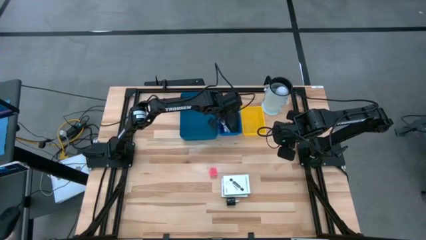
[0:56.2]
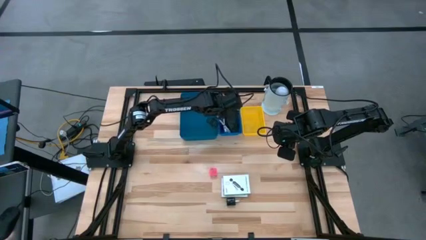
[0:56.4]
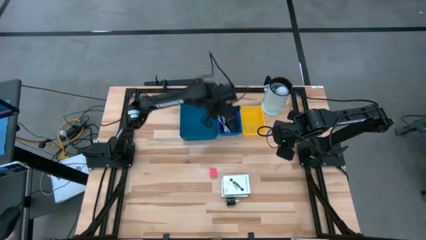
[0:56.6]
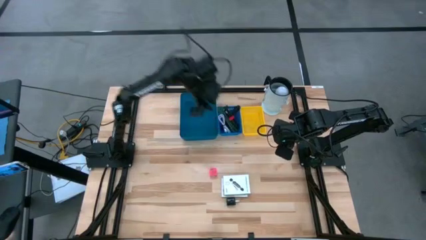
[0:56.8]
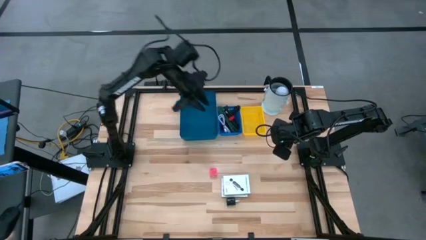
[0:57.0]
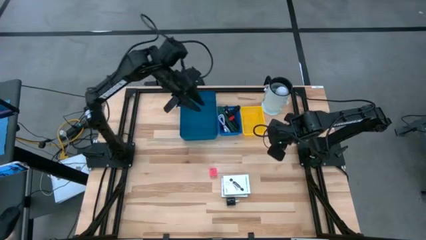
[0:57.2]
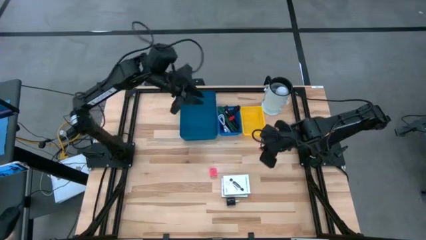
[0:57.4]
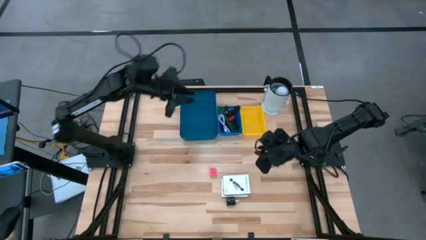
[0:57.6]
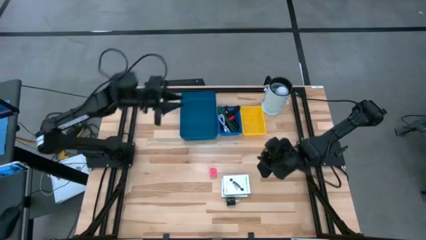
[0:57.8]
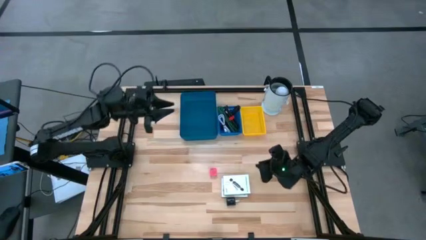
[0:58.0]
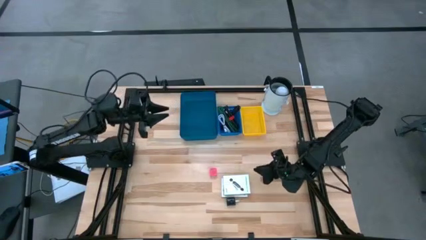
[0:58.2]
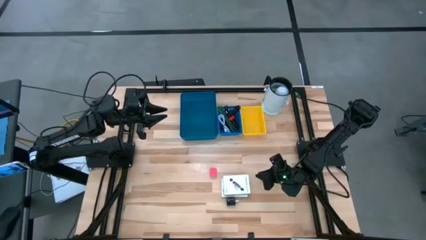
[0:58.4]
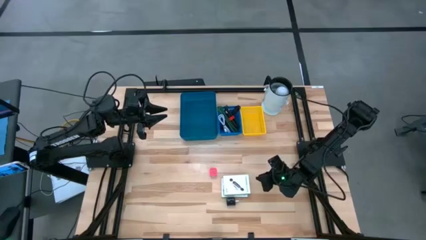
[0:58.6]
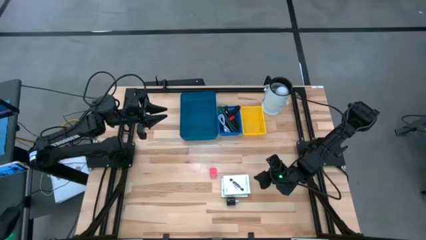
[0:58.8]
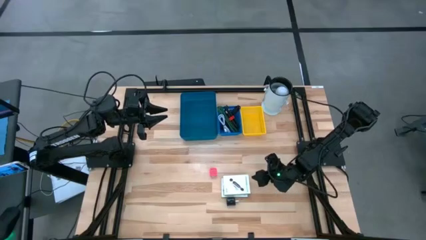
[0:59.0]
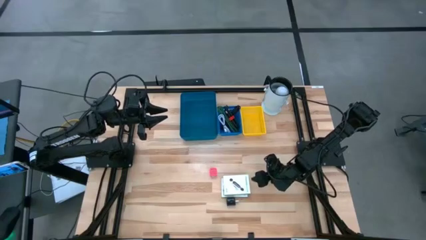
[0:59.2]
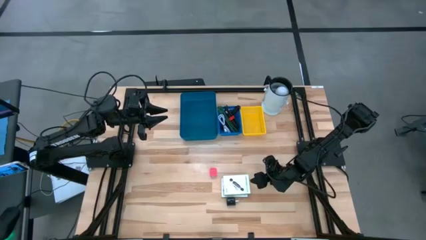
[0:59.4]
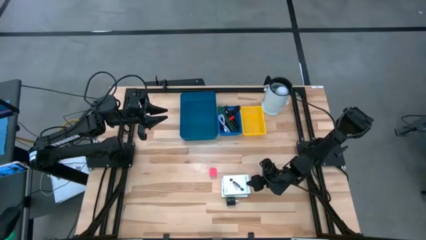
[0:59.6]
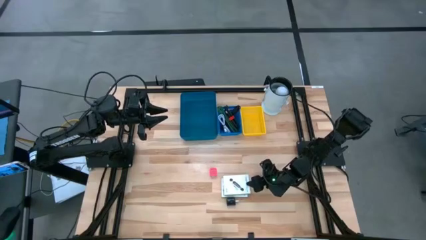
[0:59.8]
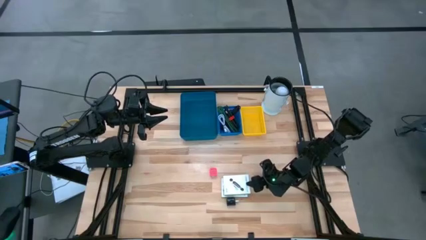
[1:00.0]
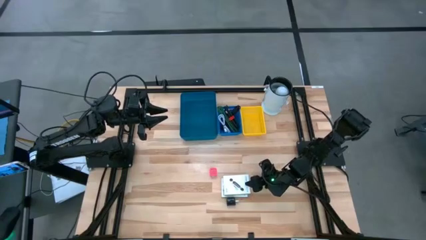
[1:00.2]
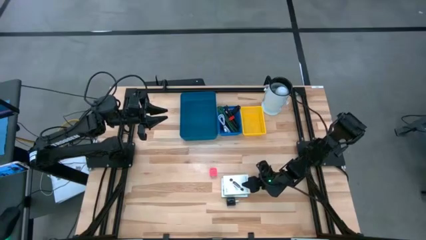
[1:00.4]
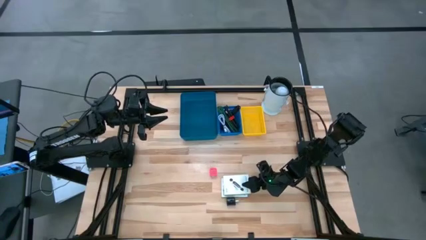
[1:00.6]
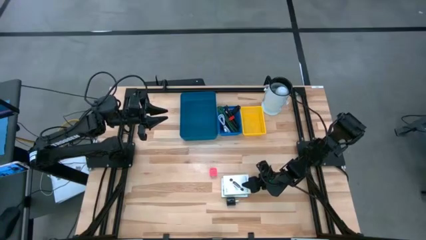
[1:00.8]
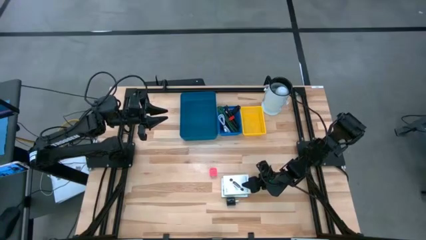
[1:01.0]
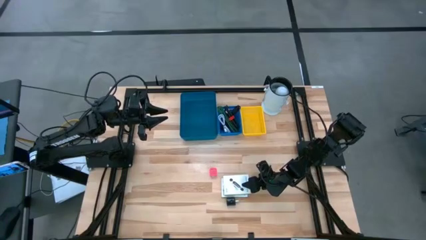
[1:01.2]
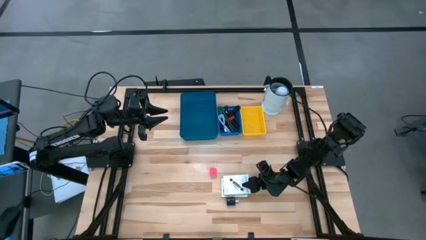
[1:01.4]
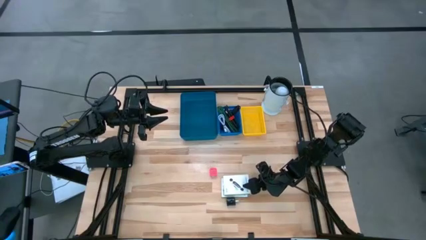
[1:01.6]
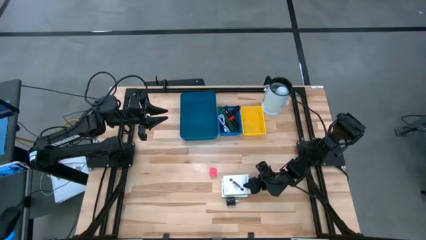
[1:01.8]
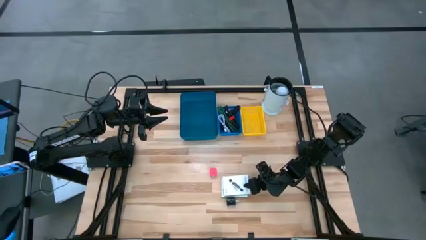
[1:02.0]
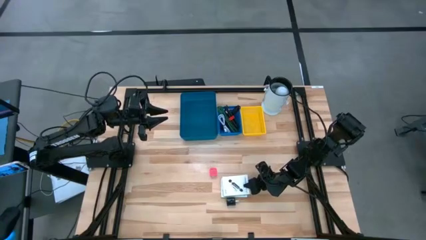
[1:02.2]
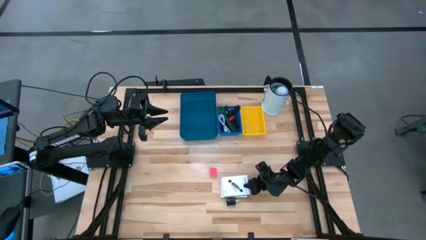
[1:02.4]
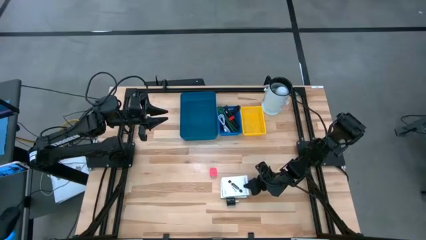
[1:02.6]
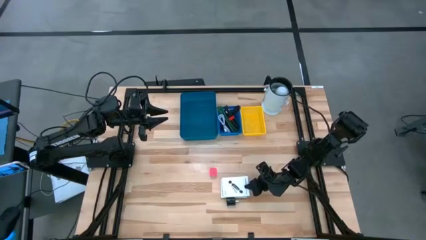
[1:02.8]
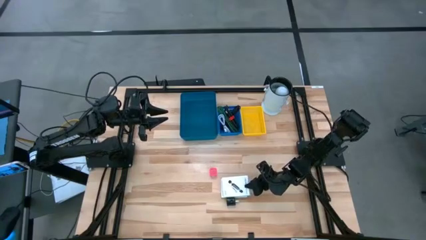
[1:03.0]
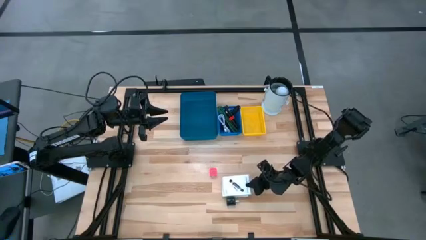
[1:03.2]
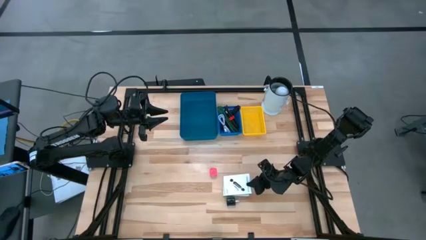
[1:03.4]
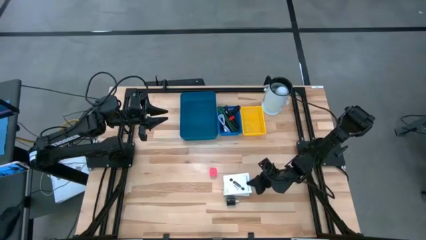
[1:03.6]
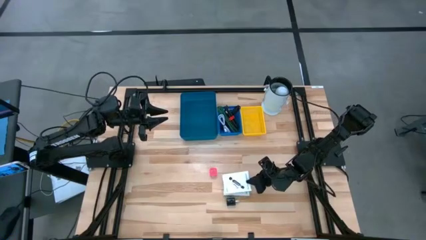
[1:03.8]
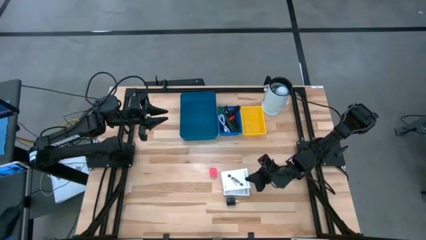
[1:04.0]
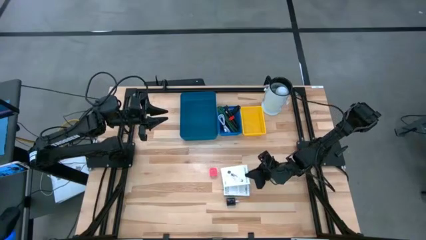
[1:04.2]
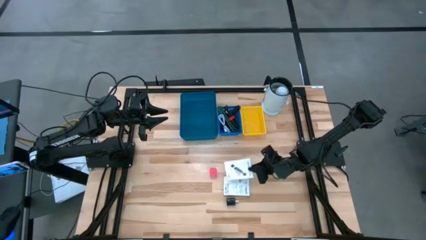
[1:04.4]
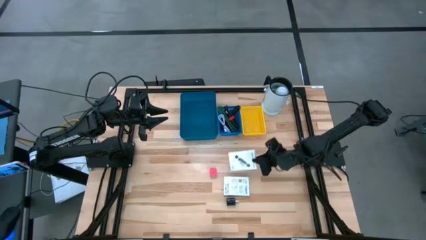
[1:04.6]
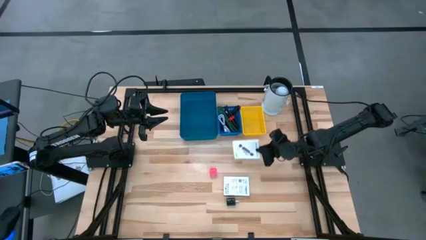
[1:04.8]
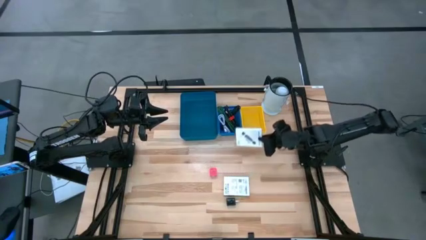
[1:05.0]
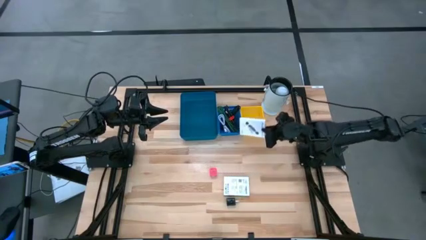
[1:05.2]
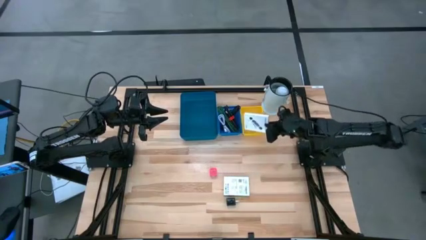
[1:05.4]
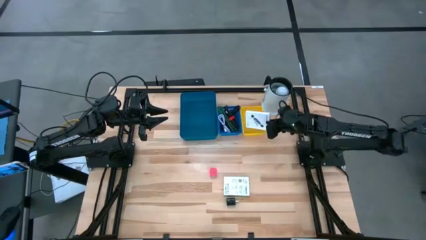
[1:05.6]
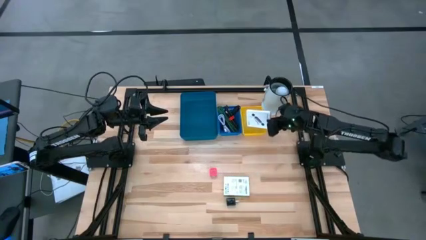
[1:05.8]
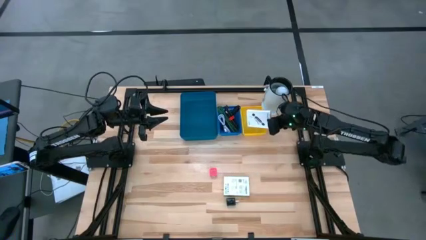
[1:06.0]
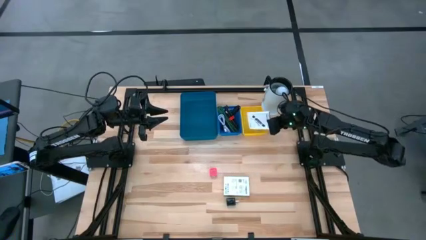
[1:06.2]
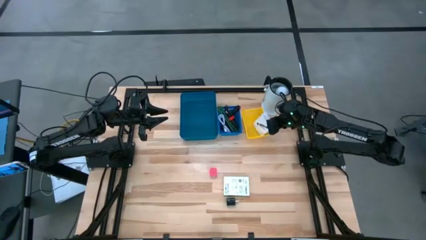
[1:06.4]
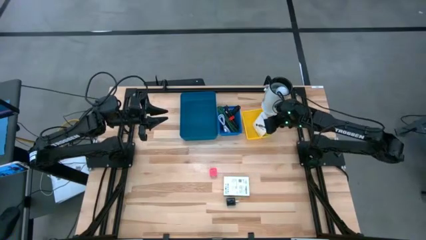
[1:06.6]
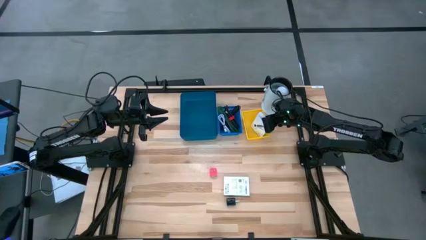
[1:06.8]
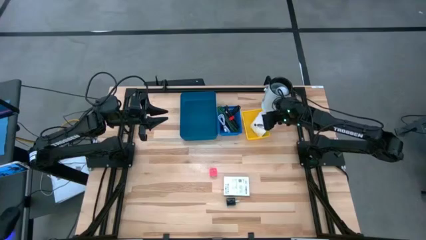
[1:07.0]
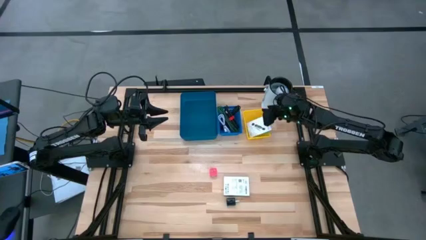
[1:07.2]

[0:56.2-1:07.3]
Task: Pick and place items into bin
Put the card reader box into the yellow basket

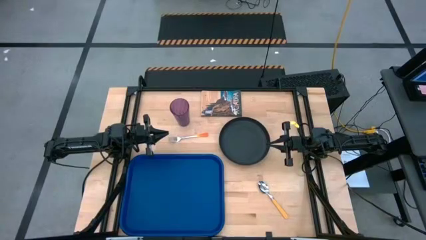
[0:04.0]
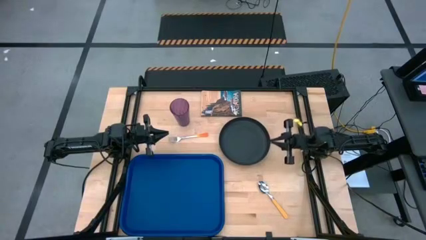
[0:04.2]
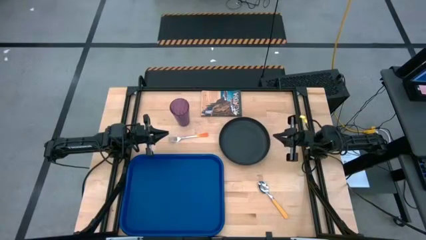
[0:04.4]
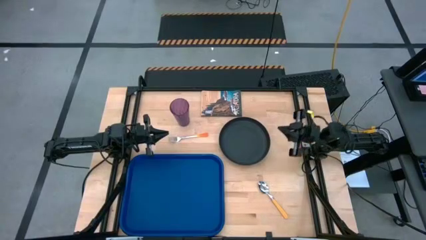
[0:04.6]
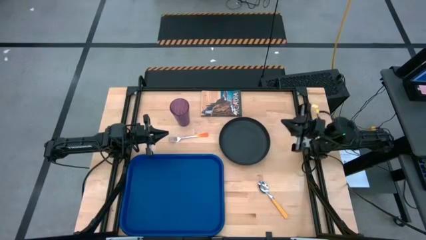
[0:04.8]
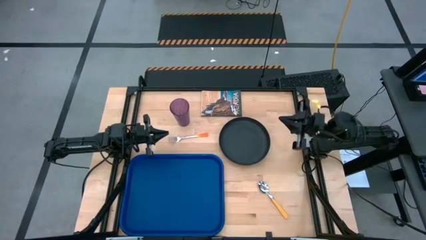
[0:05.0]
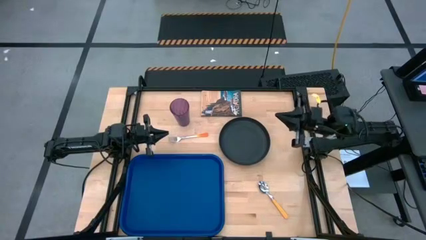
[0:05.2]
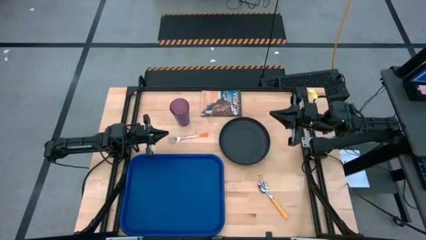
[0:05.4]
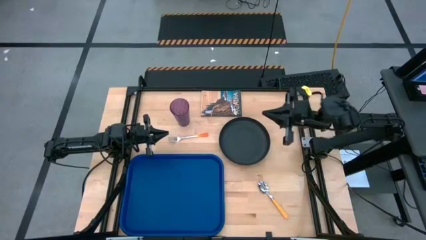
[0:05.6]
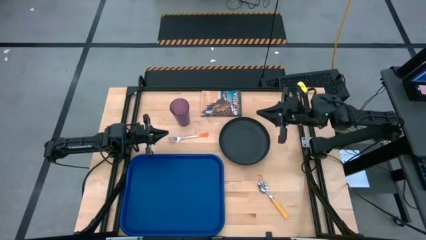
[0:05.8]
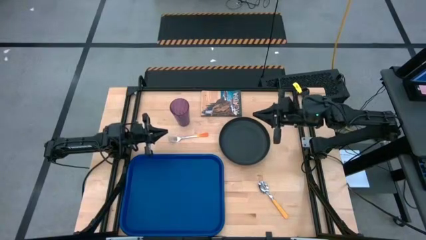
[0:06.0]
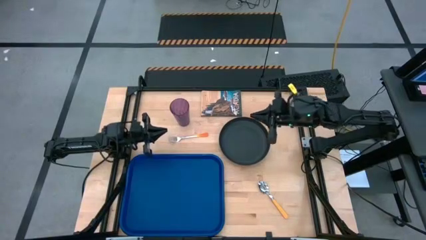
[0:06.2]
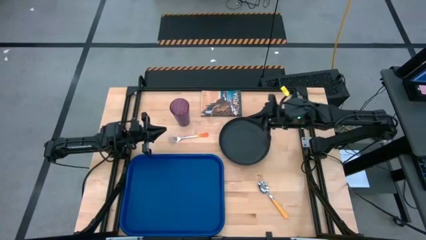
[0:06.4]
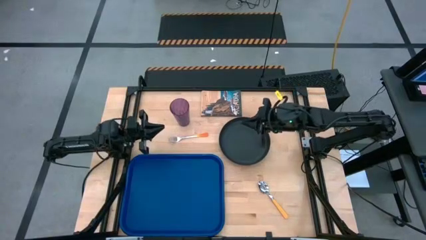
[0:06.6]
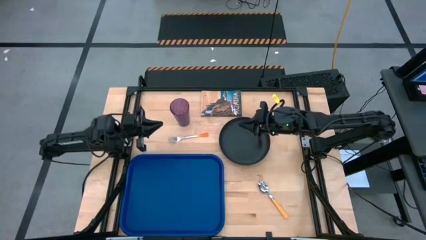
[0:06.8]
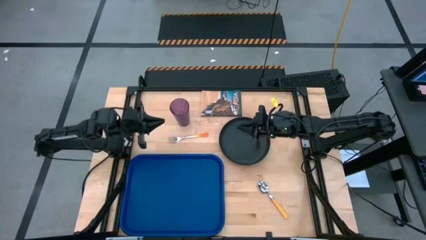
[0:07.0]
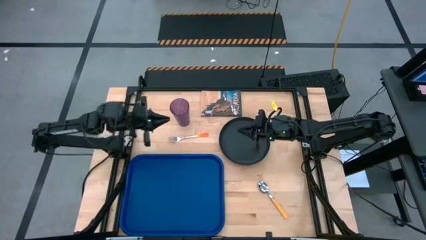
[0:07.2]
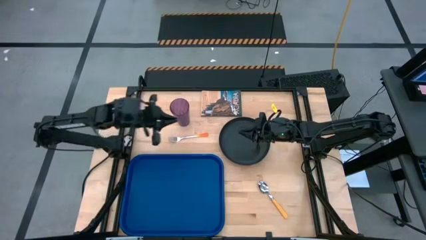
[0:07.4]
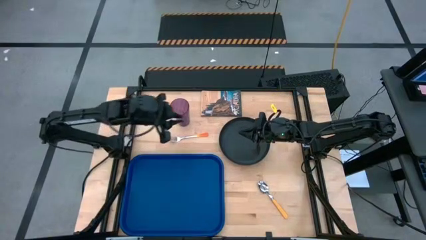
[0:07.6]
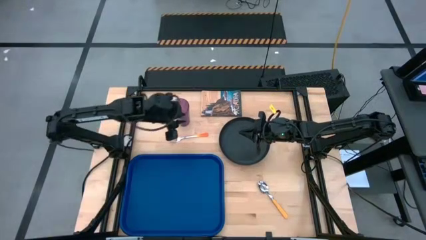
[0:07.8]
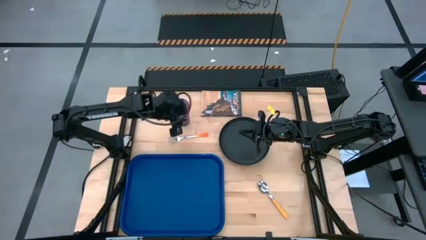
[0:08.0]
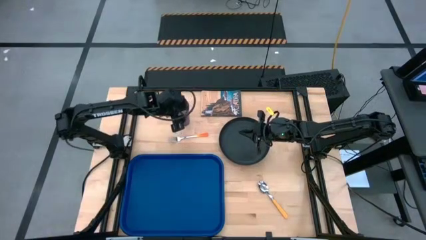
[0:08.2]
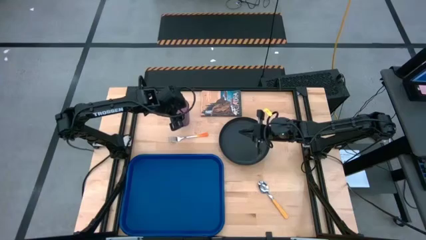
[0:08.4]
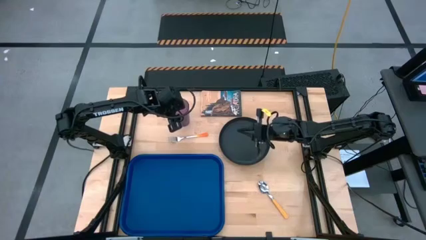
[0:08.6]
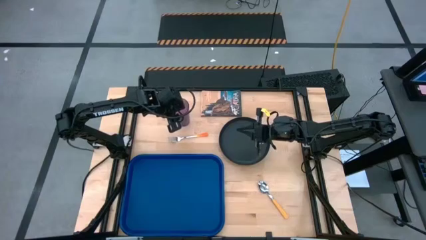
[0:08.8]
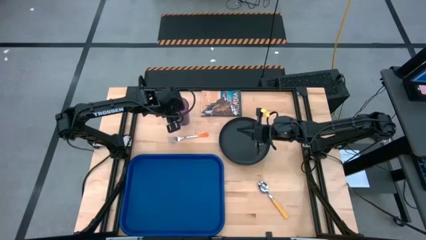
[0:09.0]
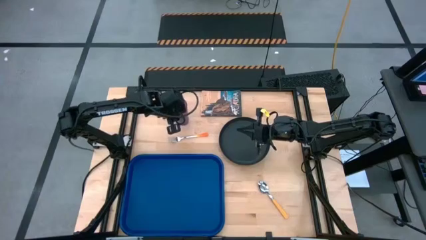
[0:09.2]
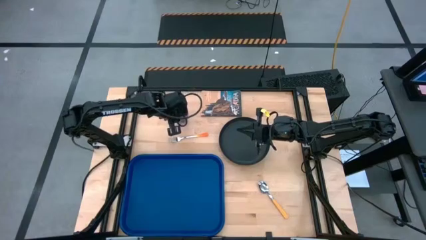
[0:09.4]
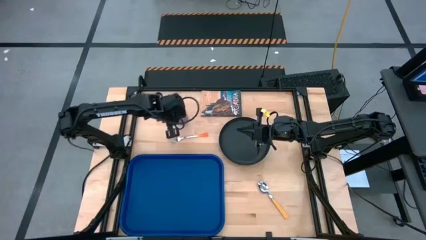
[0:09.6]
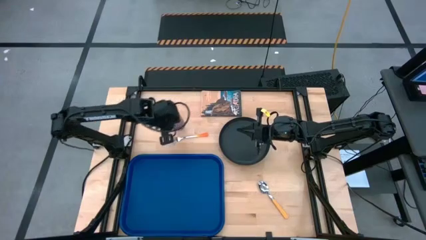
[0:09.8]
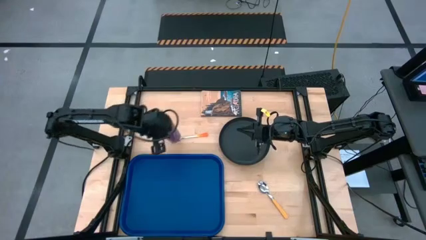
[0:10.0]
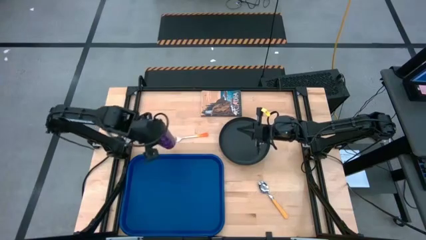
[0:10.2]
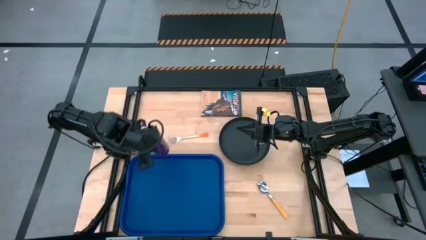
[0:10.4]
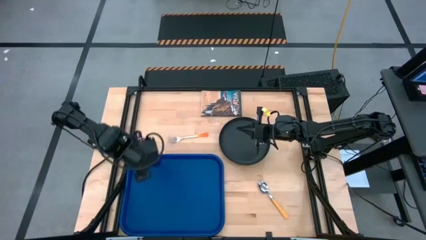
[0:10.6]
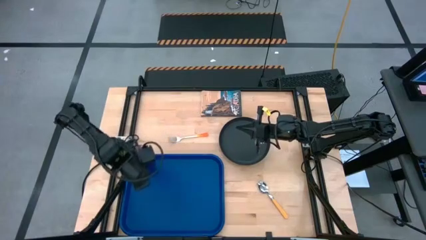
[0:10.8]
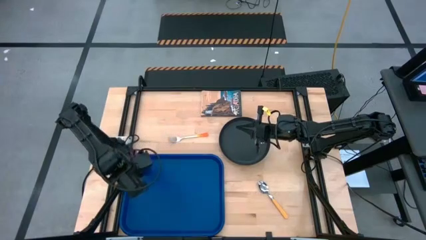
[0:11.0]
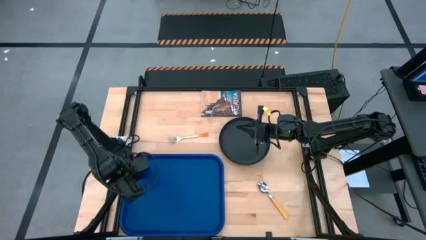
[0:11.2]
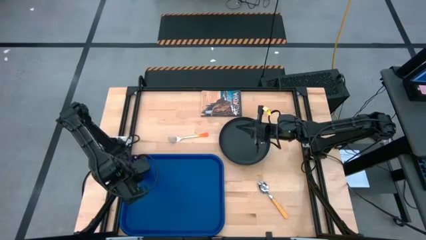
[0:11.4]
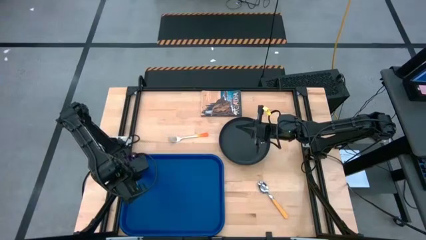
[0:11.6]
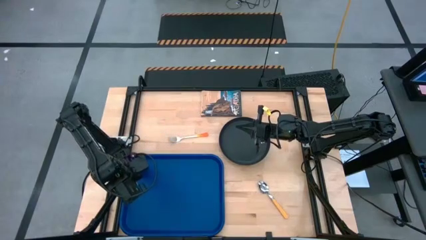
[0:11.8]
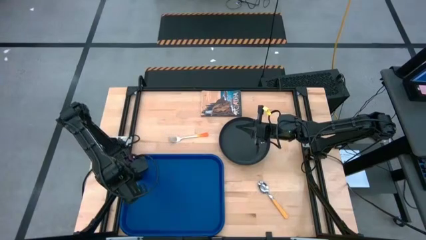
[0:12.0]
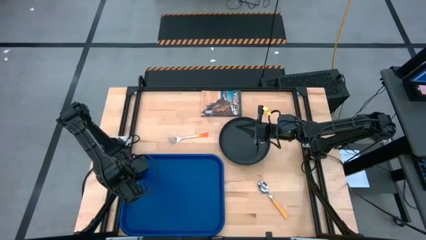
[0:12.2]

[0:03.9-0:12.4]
Task: Pick and place plate/cup/fork/spoon on tray
Put the violet glass on the top left of the blue blue serving tray
